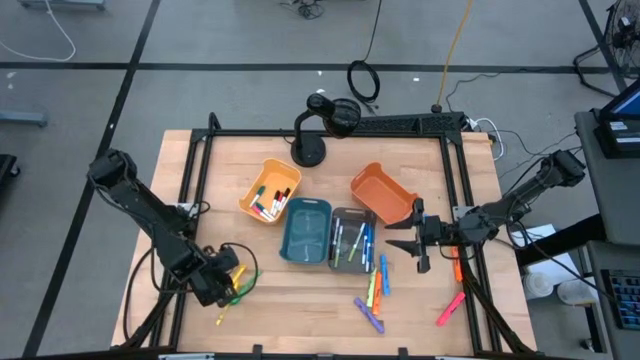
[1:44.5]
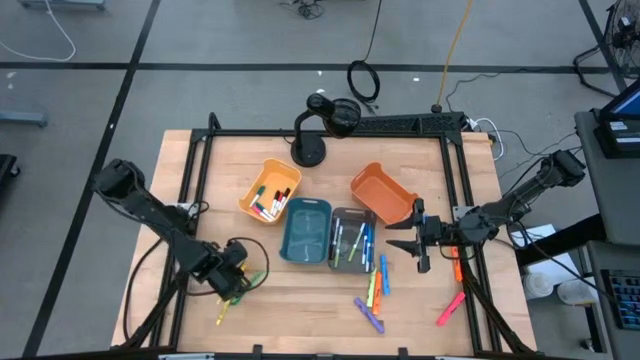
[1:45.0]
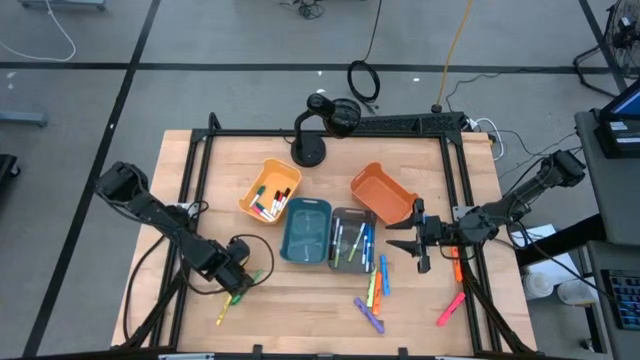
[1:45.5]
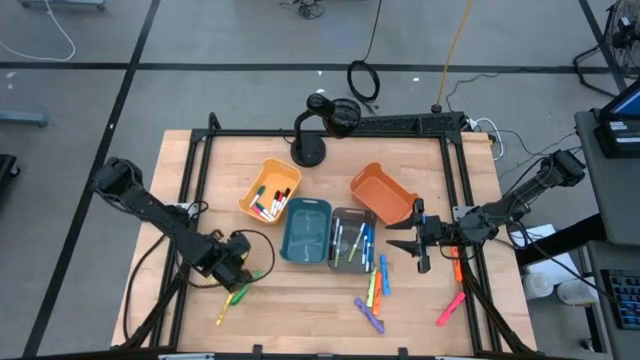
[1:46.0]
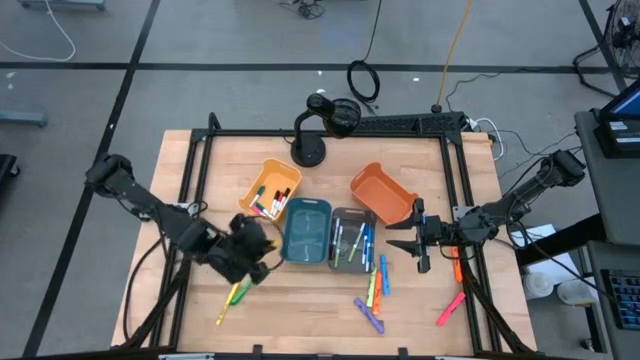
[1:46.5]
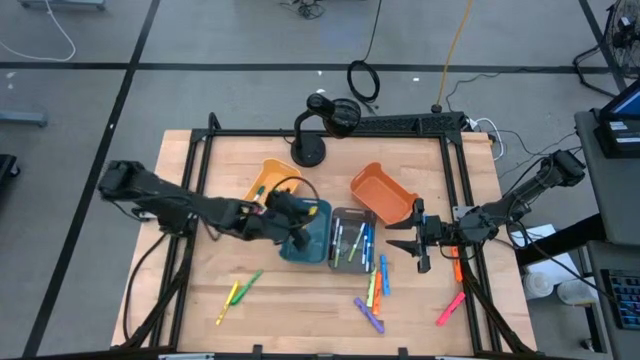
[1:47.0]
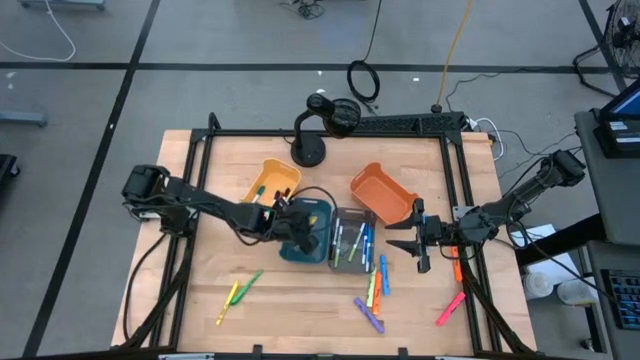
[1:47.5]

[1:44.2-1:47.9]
Task: Pick & Place Markers
Put the left yellow pen into the green bin

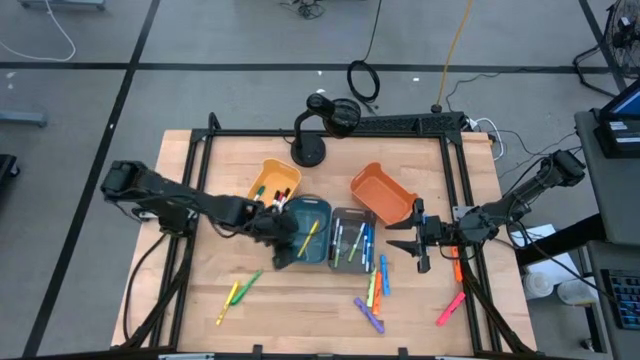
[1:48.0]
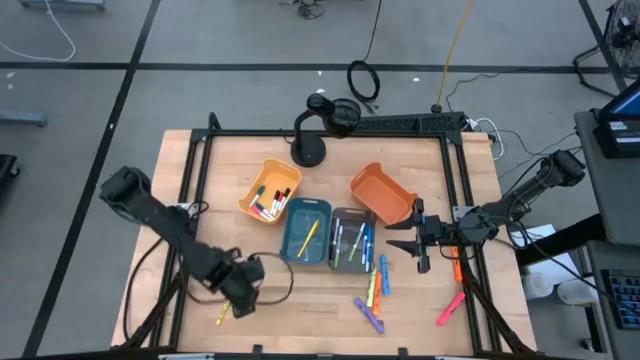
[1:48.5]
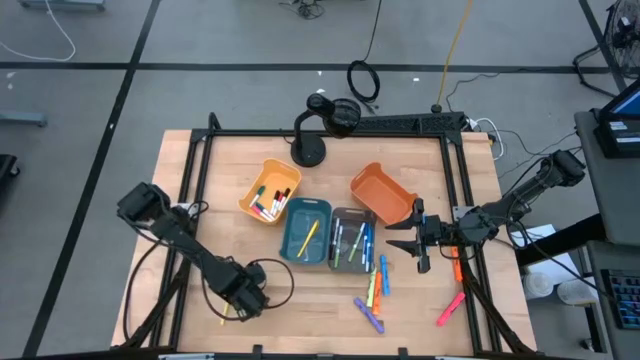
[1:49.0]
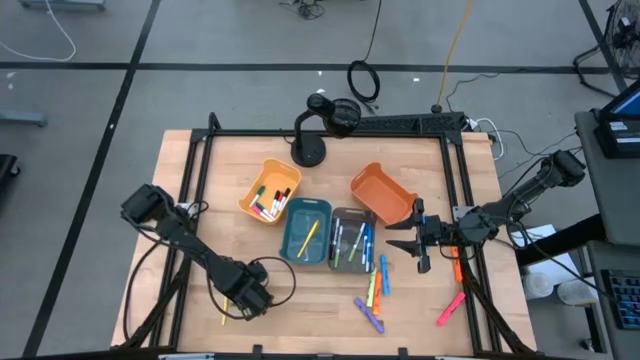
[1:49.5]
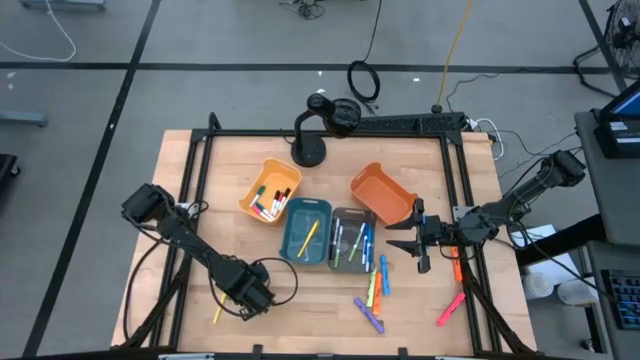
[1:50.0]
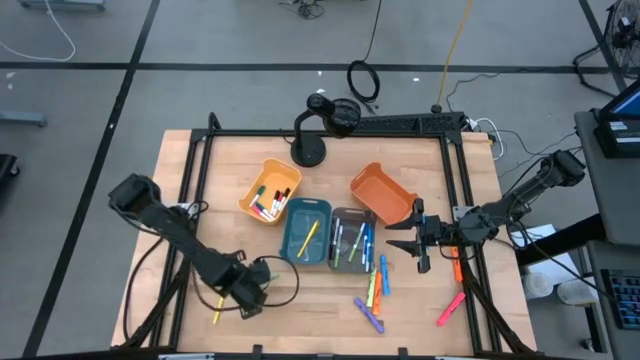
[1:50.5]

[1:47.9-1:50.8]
Put the green pen into the green bin

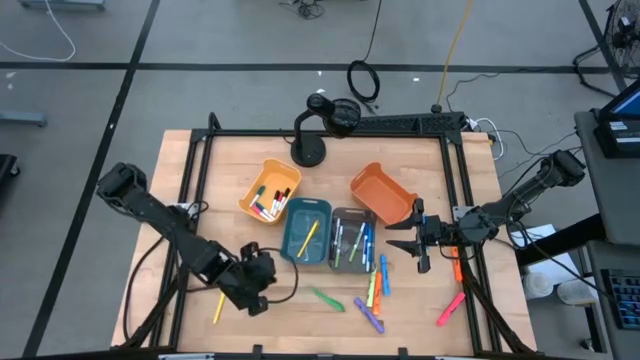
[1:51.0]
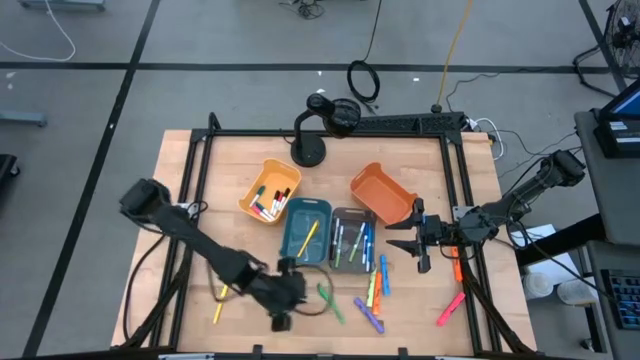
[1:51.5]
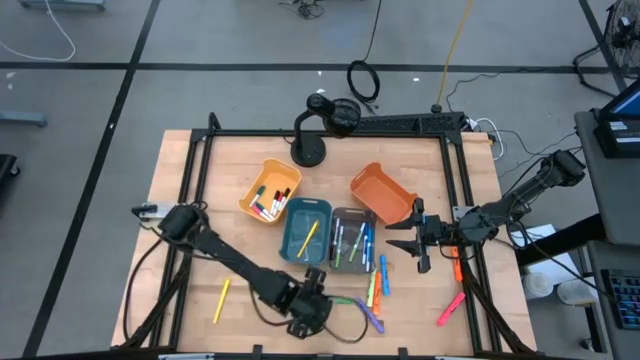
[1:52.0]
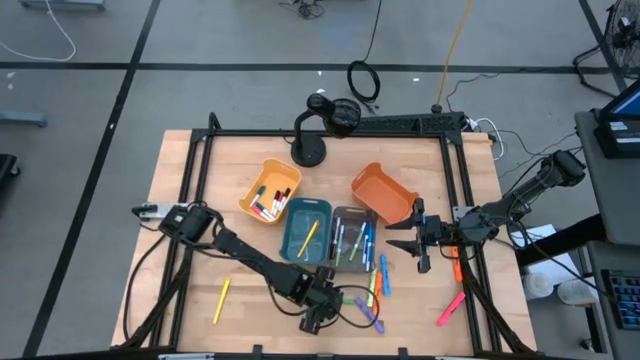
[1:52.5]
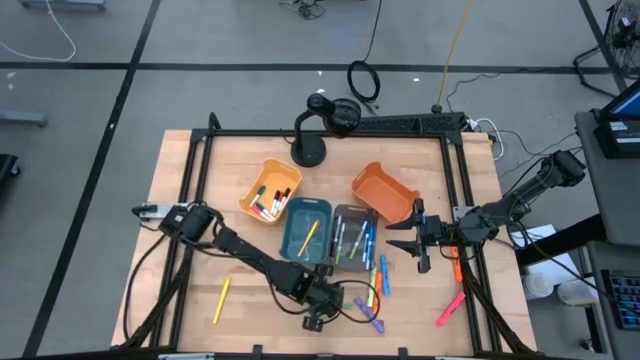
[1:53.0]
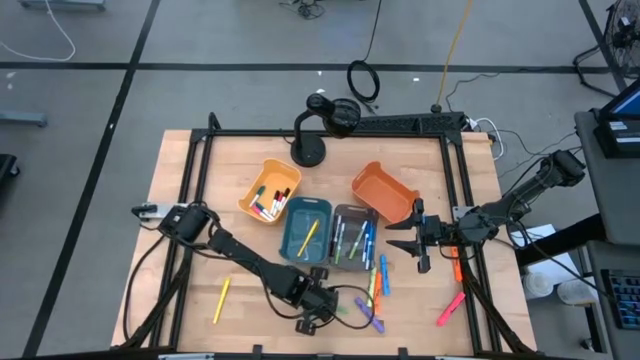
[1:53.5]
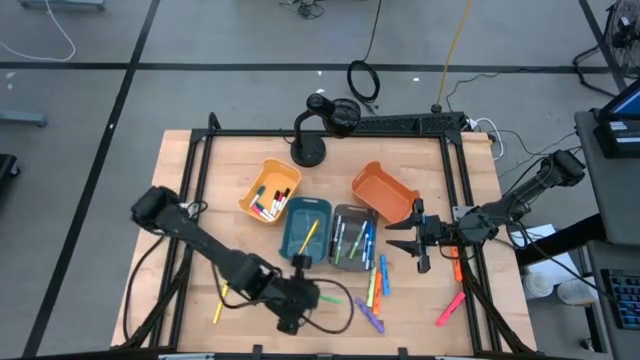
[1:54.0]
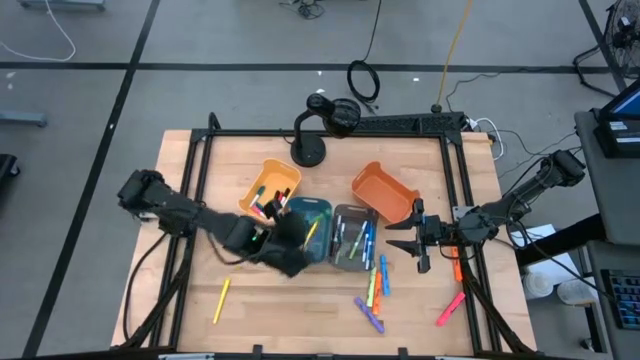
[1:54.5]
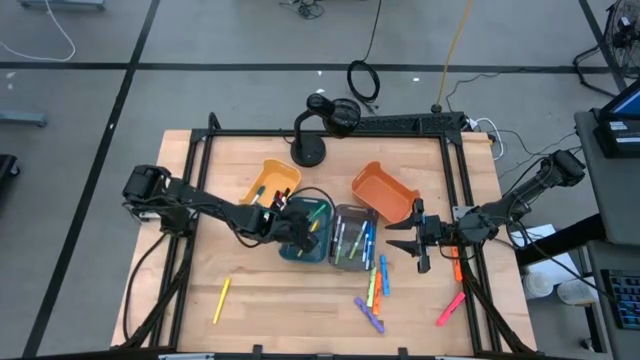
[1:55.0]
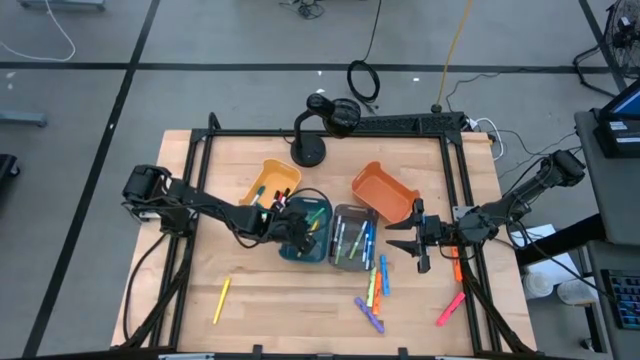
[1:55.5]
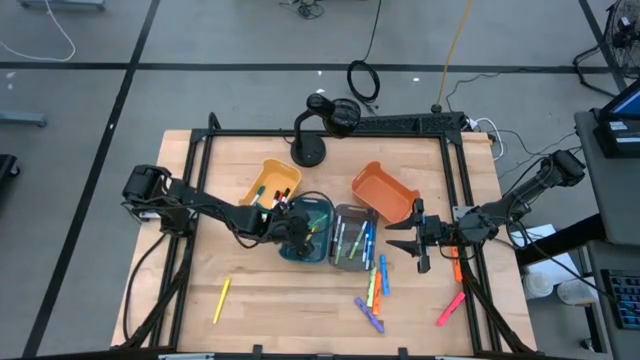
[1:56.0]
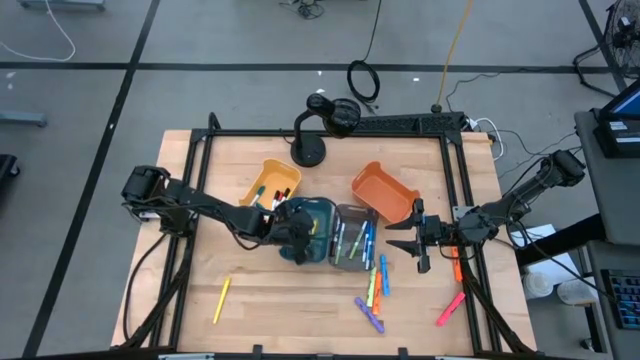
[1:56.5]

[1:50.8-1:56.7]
Put the green pen into the green bin

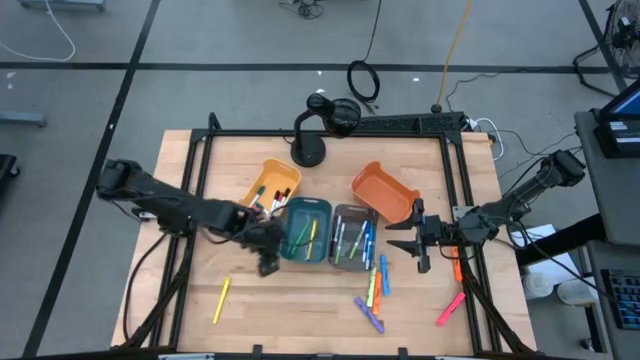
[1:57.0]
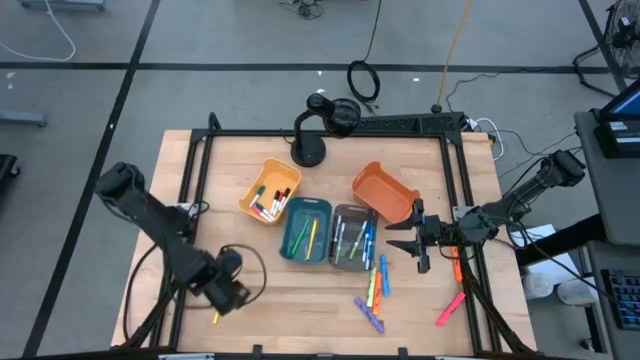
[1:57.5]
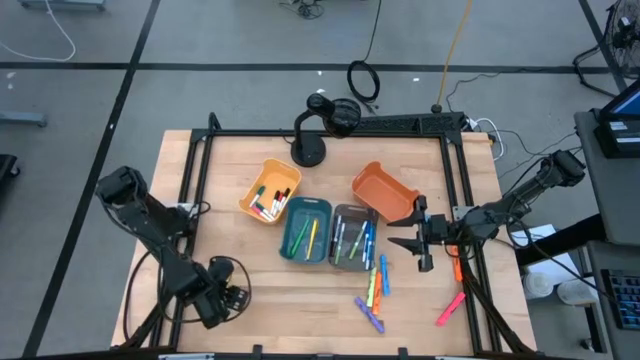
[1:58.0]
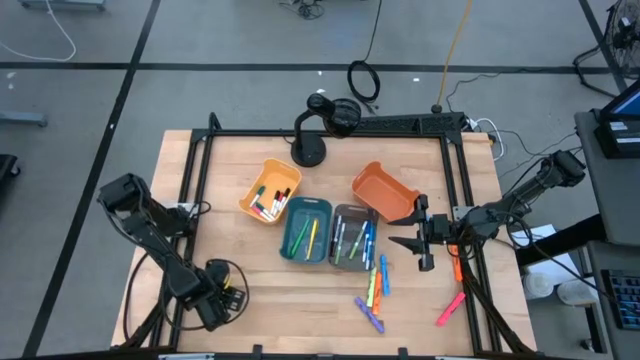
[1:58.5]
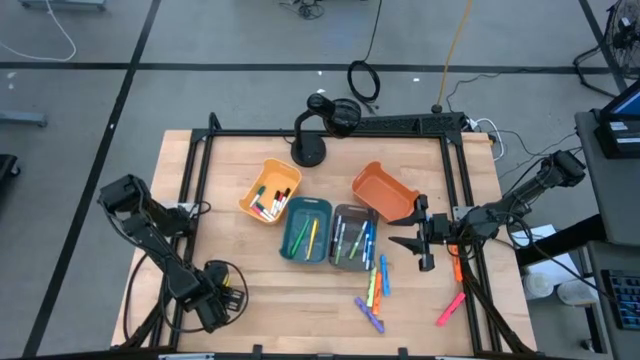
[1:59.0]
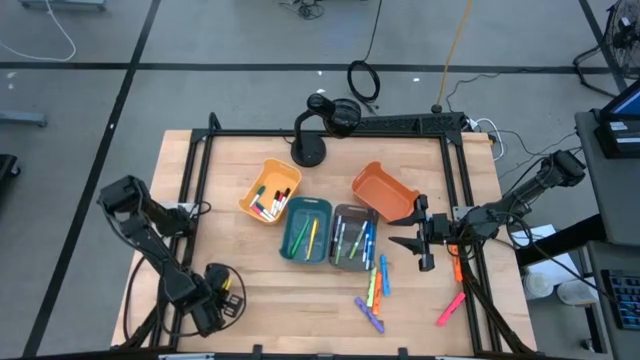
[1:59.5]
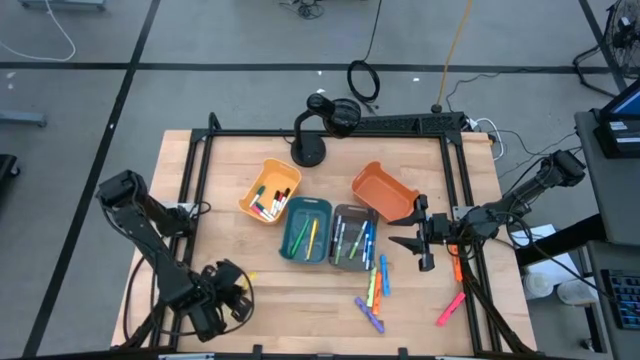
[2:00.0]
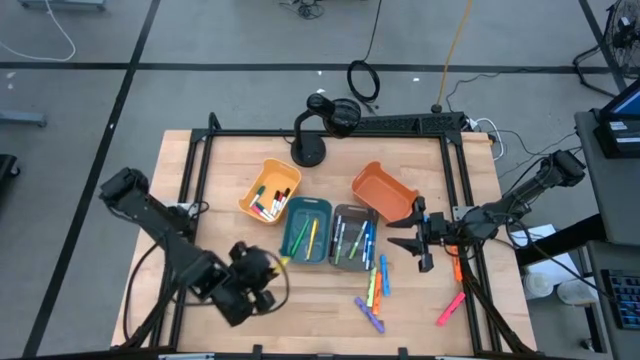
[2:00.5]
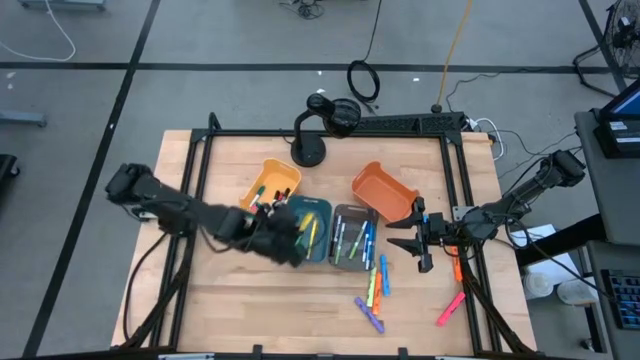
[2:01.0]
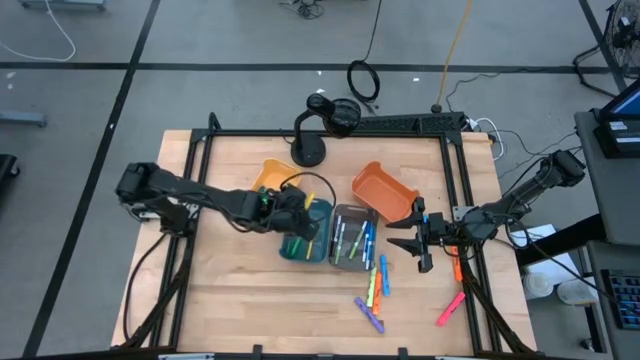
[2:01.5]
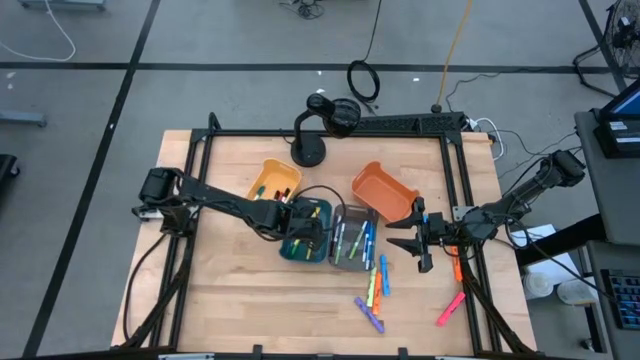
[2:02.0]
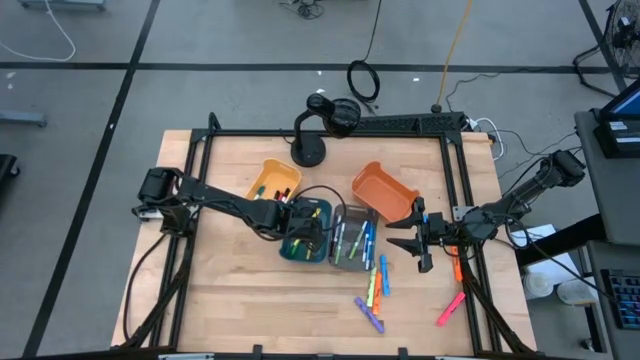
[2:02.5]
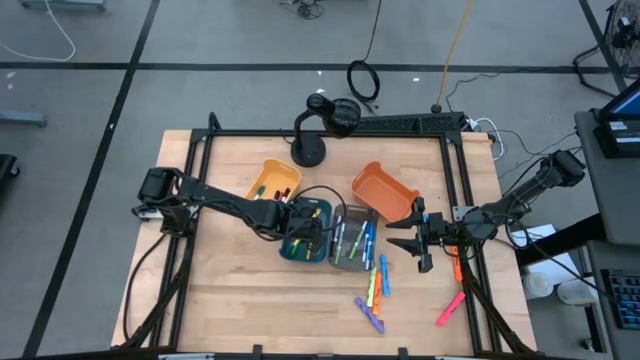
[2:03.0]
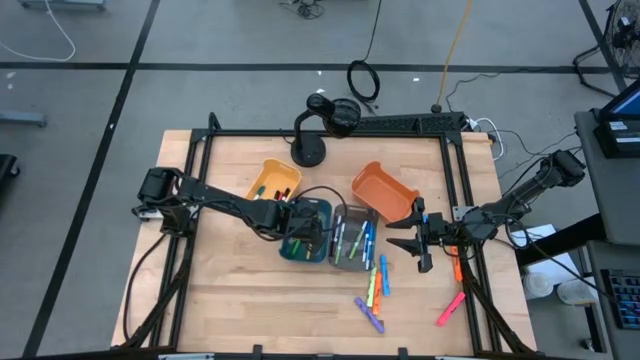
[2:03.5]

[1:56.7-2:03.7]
Put the yellow pen into the green bin

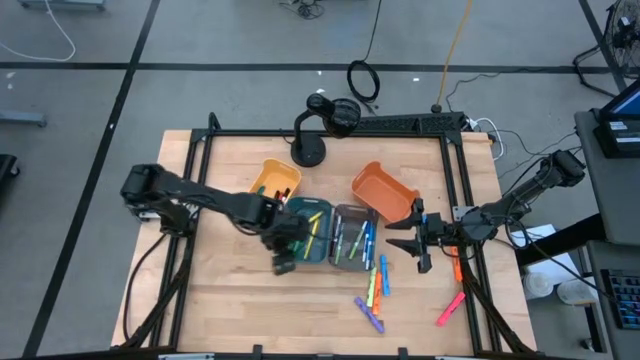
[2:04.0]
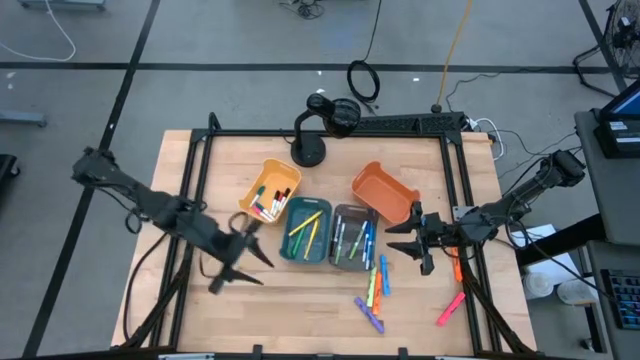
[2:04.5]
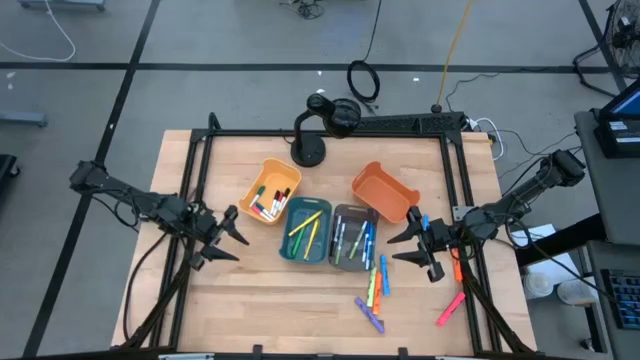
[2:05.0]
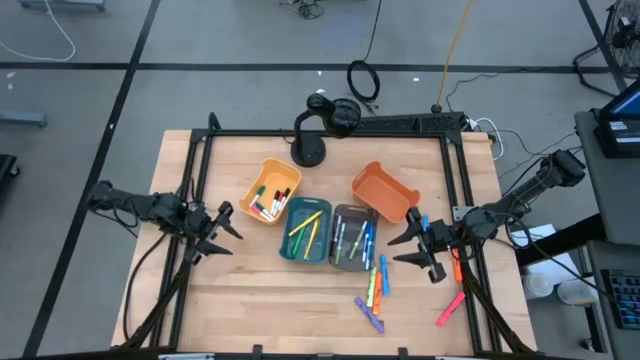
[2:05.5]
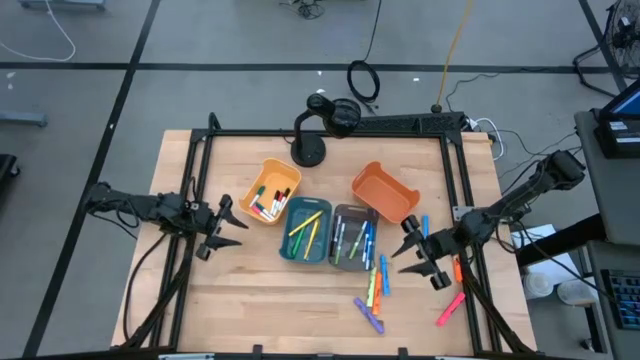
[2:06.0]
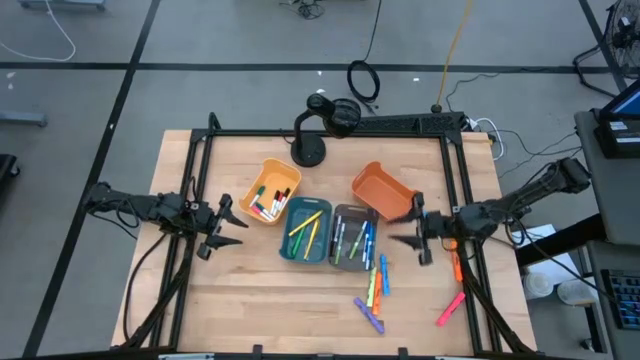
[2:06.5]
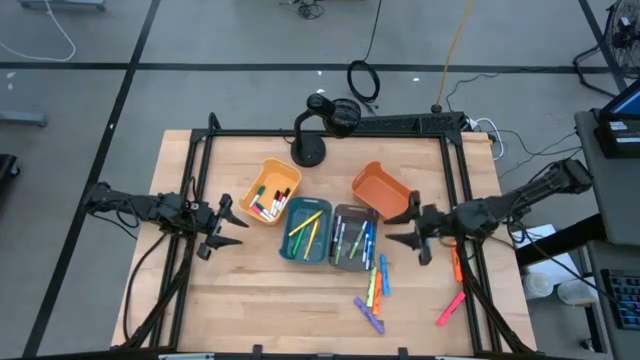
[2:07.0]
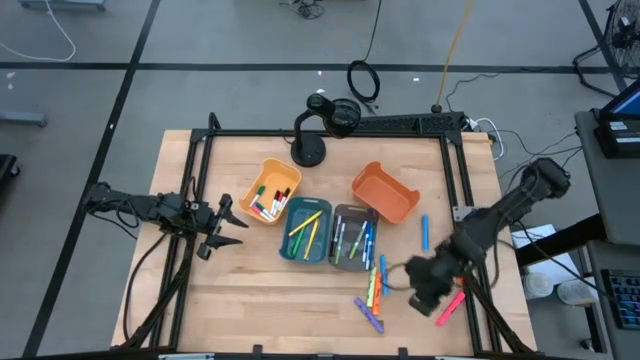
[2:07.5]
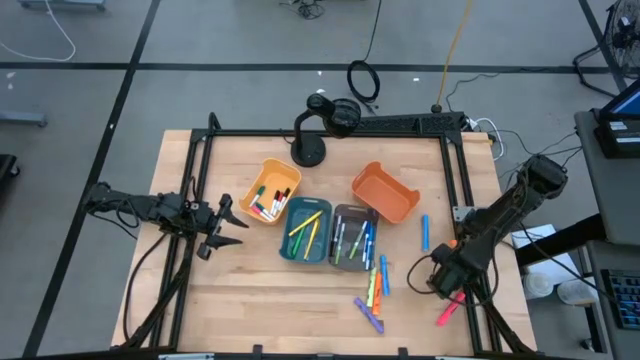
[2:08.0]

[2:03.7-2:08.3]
Put the right orange highlighter into the orange bin
